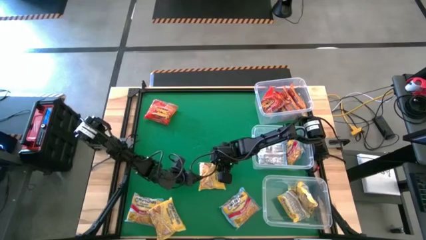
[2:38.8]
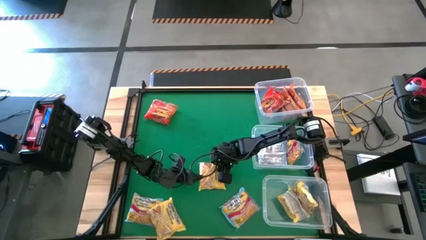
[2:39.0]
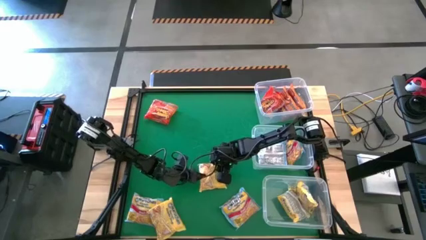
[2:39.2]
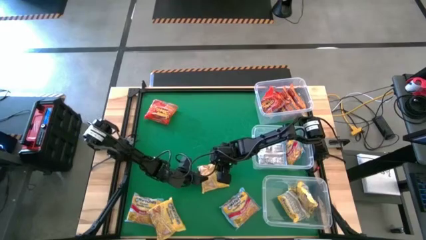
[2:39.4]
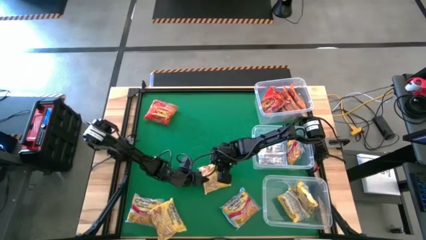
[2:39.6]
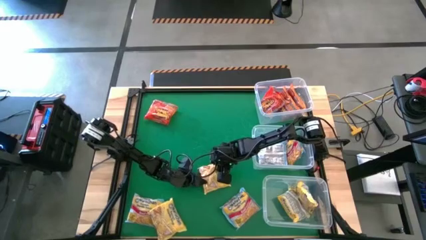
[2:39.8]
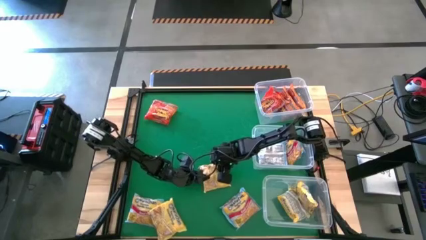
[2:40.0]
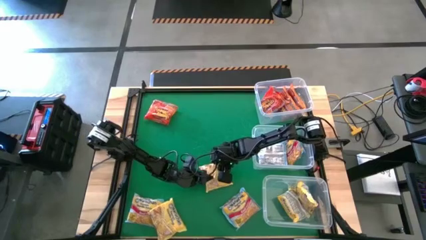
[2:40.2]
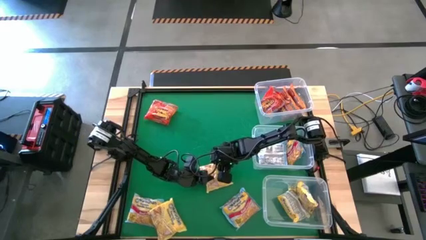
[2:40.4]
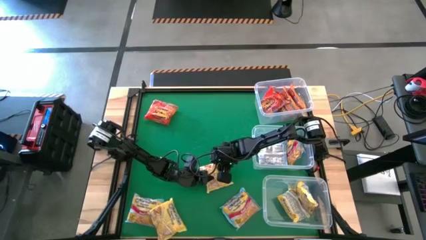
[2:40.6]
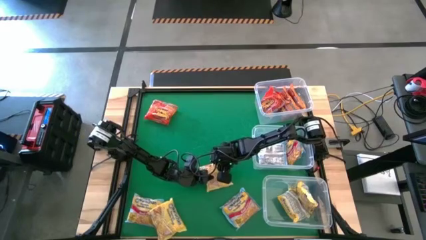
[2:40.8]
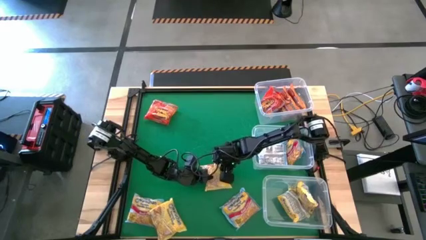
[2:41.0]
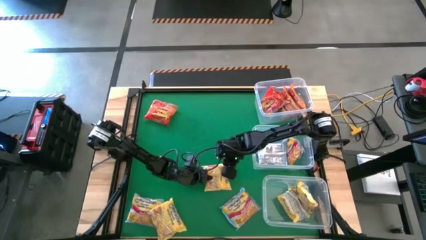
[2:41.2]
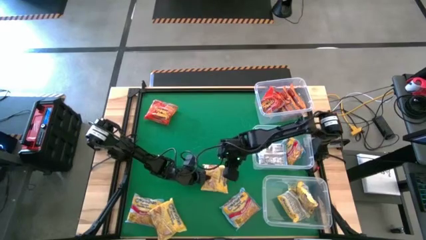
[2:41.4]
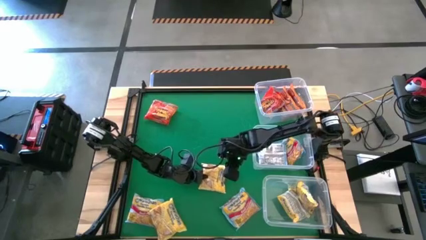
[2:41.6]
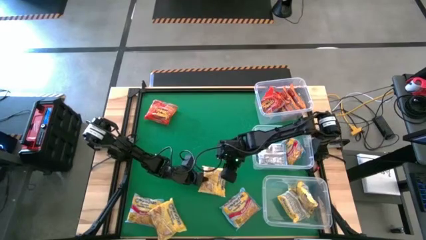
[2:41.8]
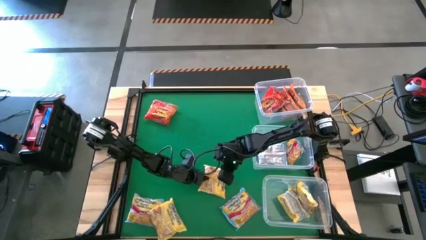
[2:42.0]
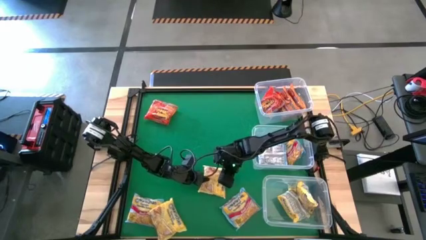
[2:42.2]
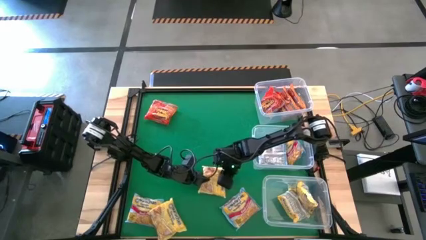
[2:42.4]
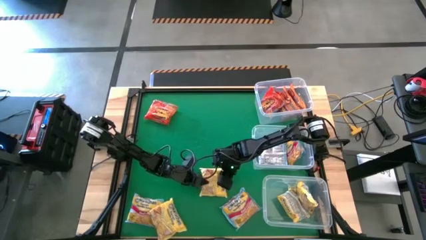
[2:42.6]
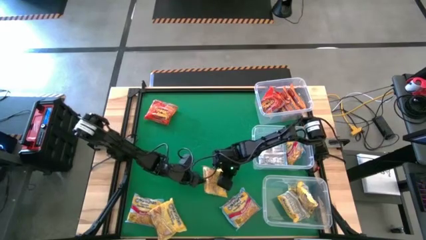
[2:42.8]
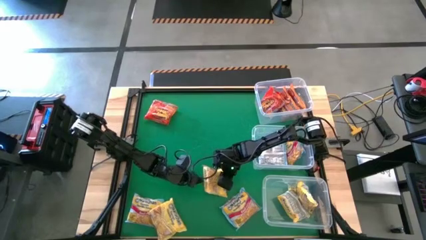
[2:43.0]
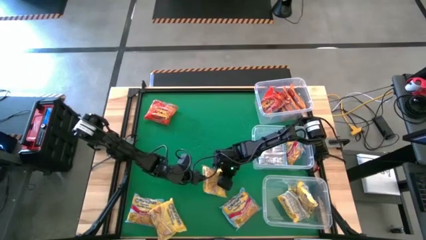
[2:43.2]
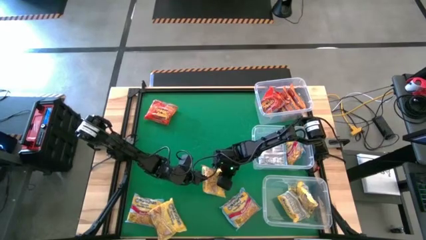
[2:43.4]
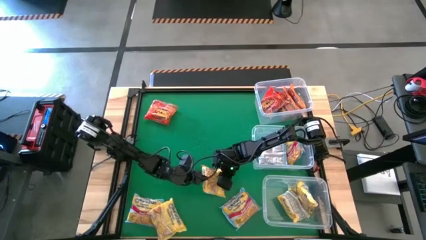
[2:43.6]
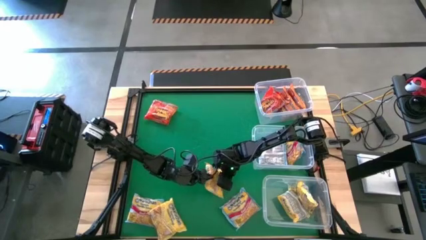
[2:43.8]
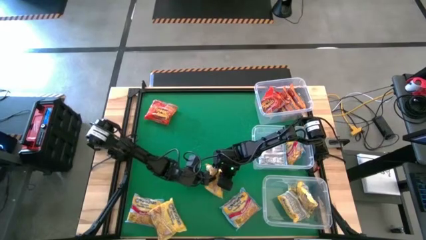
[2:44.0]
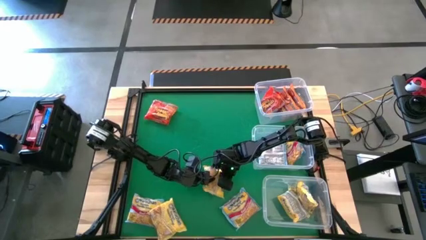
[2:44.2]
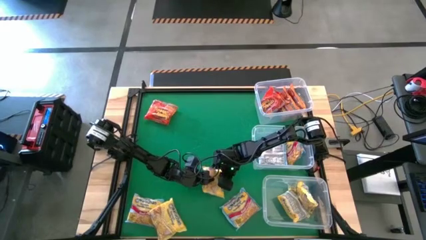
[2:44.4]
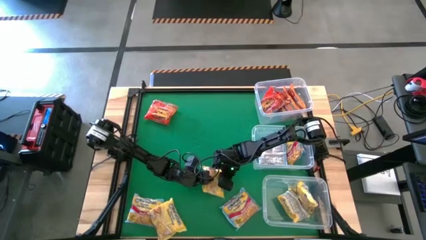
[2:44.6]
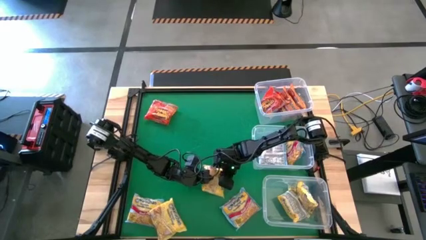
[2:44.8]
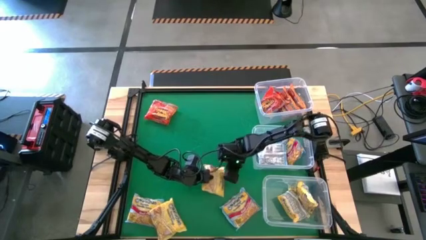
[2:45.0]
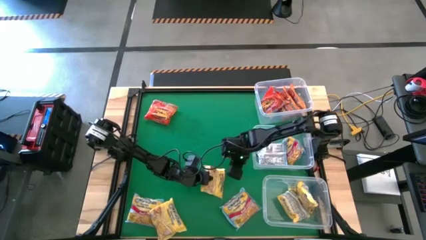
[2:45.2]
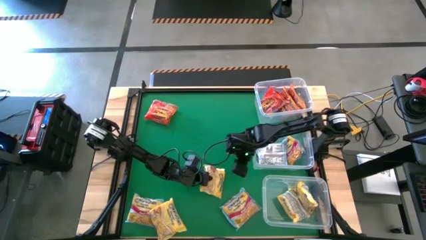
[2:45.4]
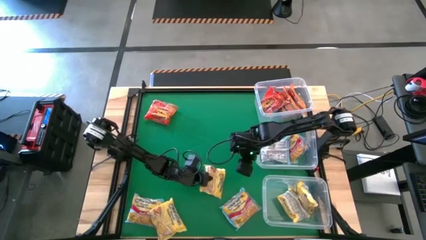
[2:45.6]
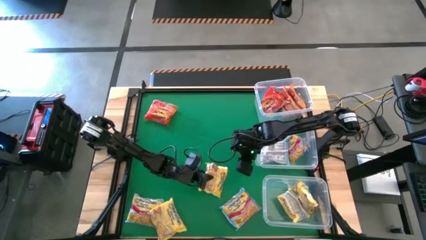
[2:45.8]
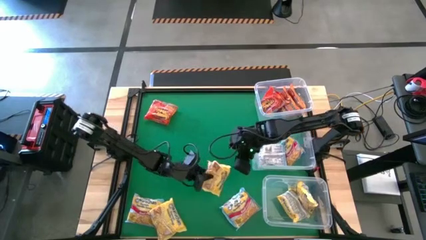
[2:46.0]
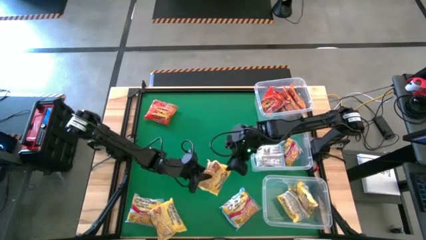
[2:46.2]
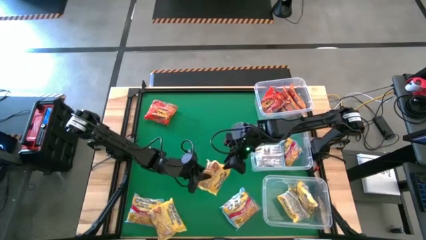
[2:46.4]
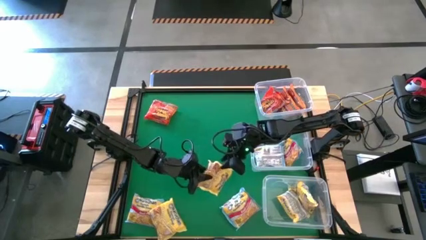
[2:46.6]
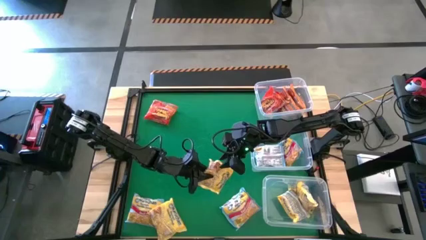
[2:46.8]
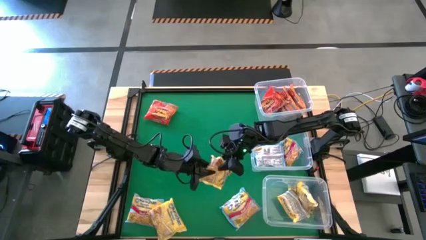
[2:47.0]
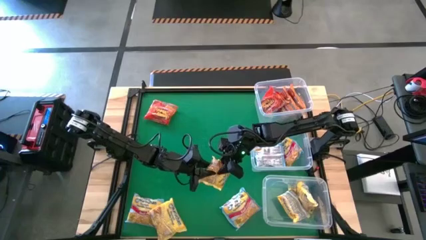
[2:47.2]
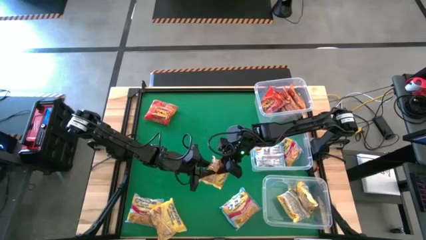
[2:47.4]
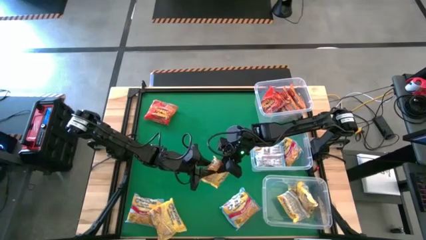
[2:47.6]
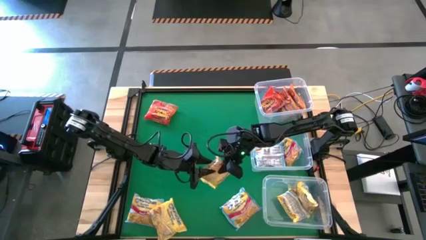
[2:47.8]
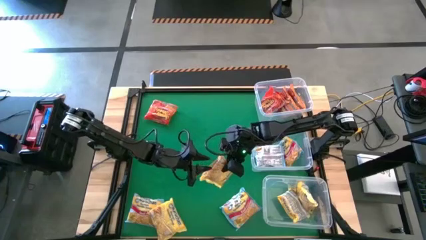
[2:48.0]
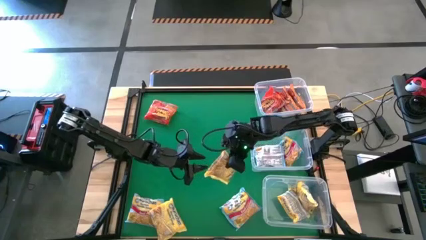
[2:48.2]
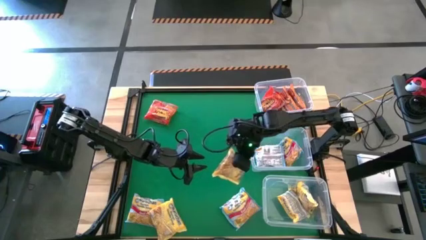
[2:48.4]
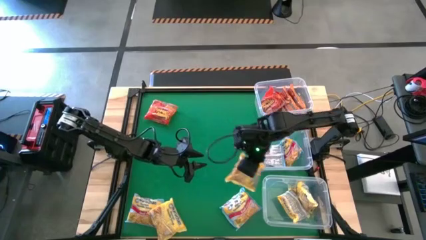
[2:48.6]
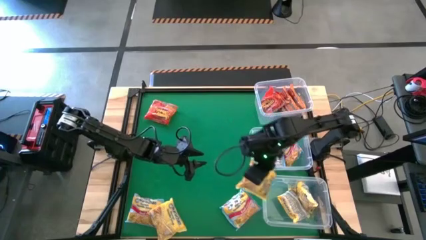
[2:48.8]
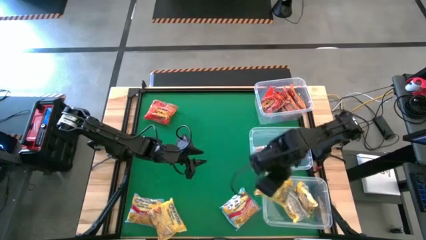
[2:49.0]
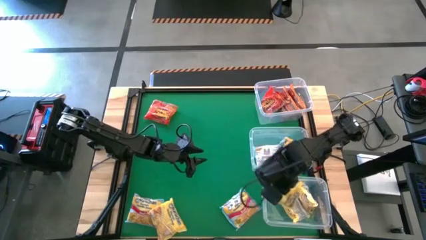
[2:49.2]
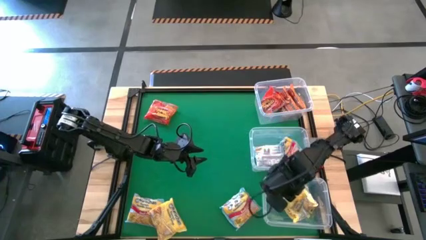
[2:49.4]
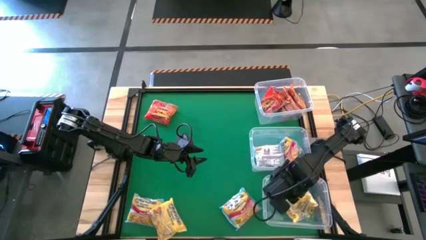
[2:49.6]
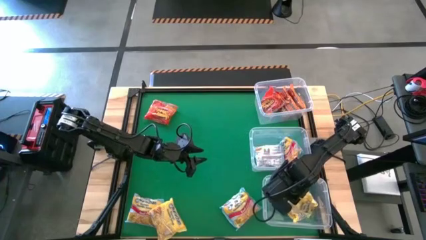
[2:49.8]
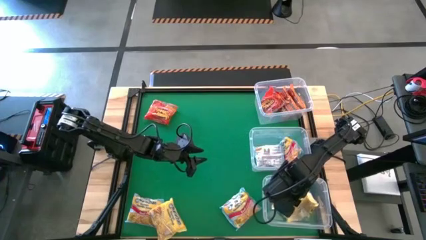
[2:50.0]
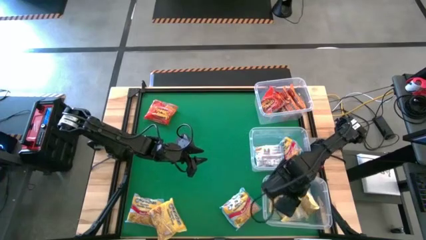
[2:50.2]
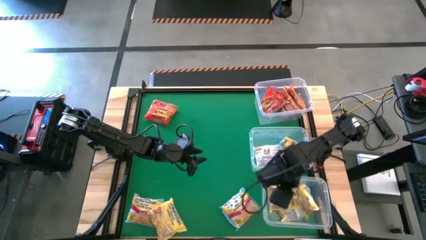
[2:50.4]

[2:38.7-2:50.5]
Task: Sort Maruchan noodles
Put the bottom right yellow noodle pack into the bottom transparent bin

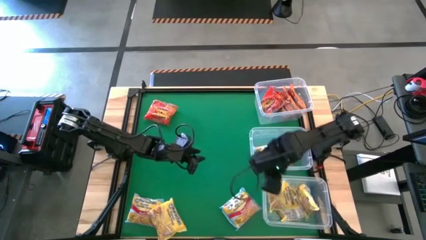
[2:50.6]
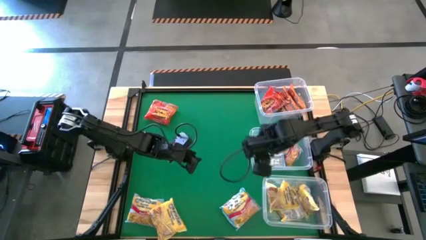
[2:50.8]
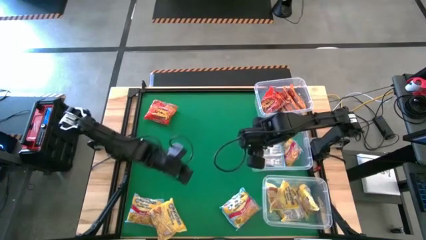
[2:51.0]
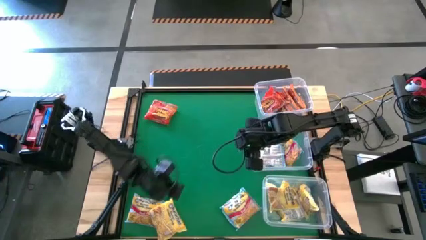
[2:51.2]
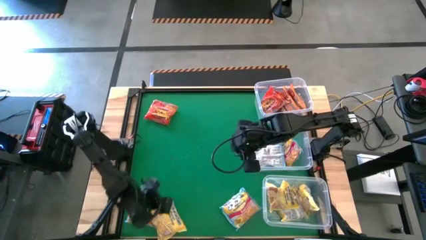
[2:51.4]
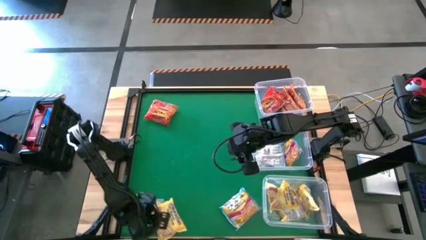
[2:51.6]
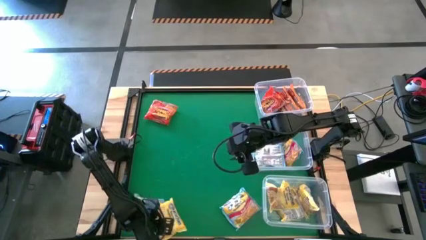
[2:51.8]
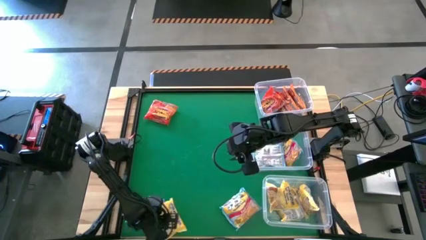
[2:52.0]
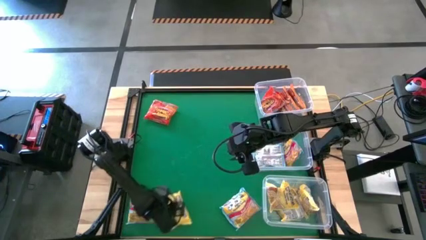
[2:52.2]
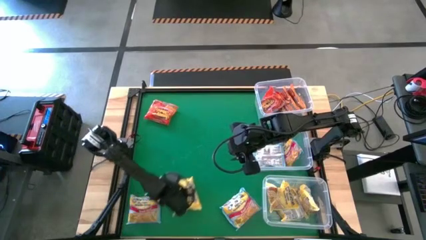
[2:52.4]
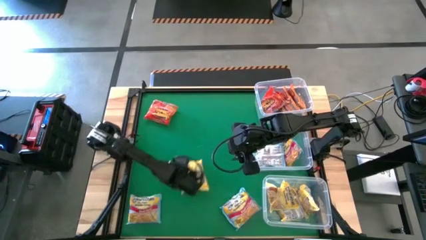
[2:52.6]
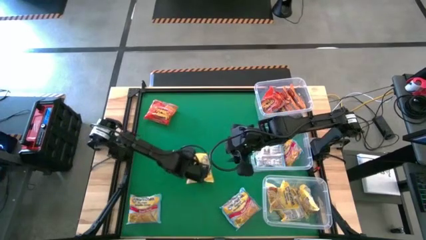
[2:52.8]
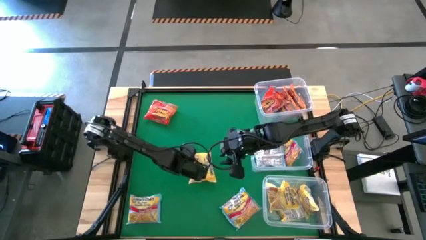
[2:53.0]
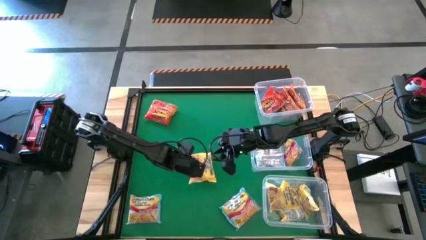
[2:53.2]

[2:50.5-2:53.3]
Move the yellow noodle pack to the center of the table
